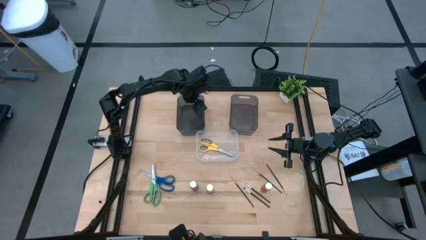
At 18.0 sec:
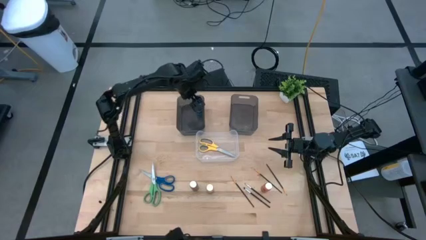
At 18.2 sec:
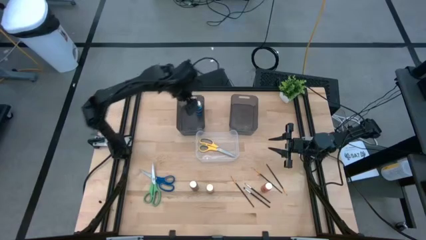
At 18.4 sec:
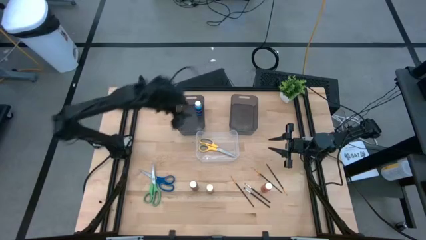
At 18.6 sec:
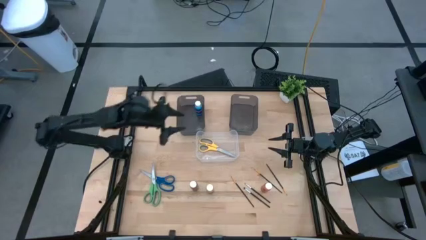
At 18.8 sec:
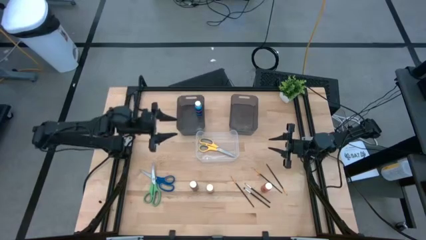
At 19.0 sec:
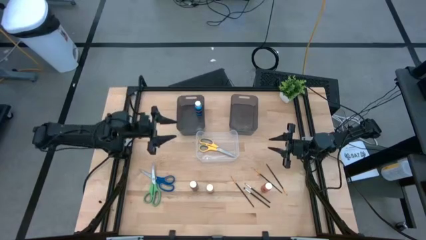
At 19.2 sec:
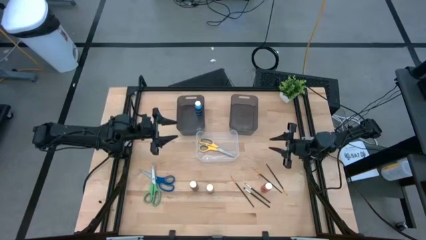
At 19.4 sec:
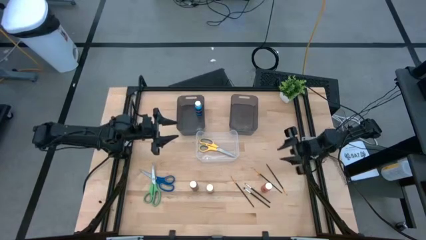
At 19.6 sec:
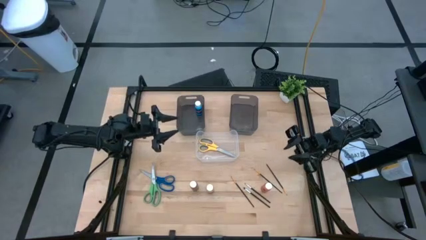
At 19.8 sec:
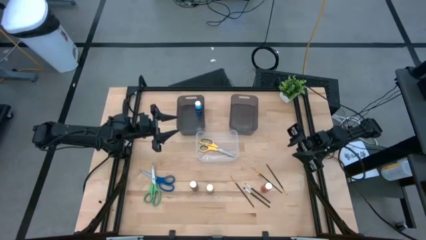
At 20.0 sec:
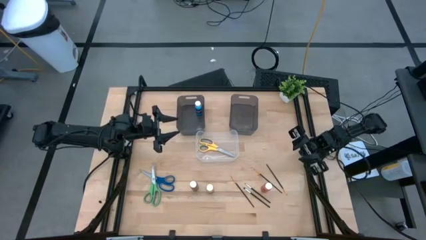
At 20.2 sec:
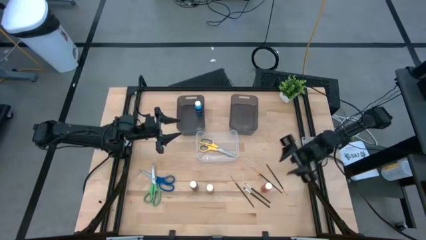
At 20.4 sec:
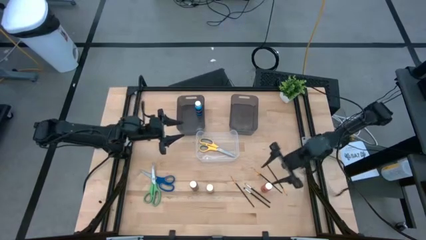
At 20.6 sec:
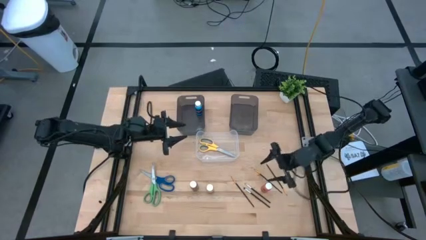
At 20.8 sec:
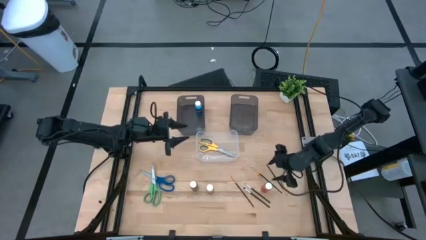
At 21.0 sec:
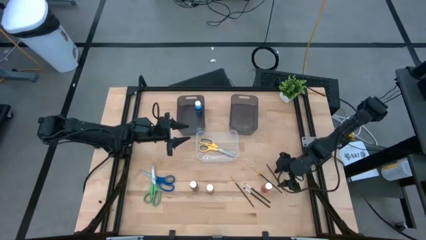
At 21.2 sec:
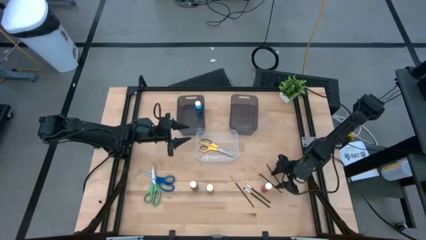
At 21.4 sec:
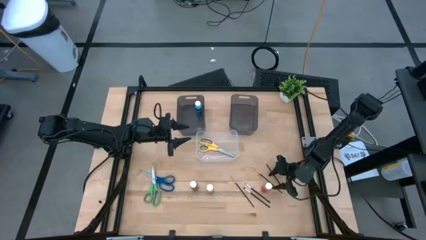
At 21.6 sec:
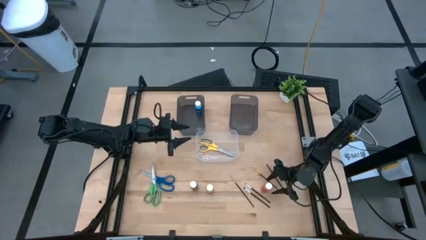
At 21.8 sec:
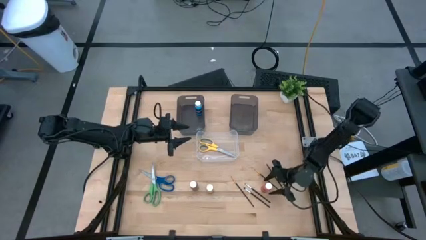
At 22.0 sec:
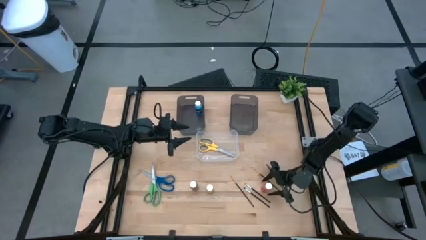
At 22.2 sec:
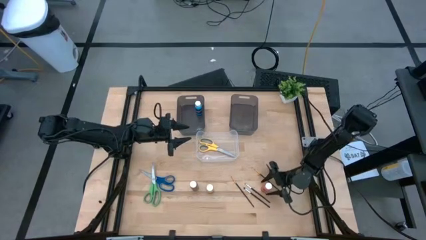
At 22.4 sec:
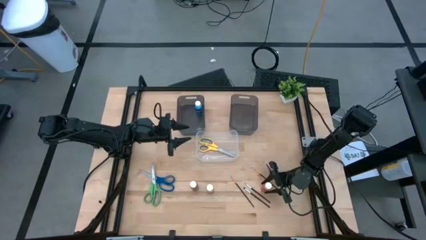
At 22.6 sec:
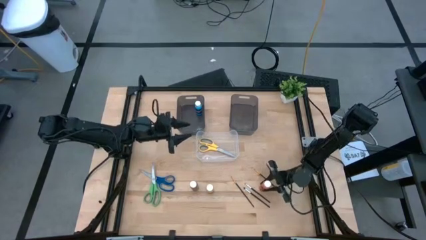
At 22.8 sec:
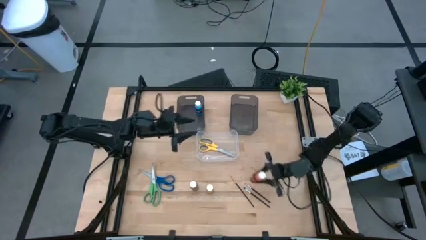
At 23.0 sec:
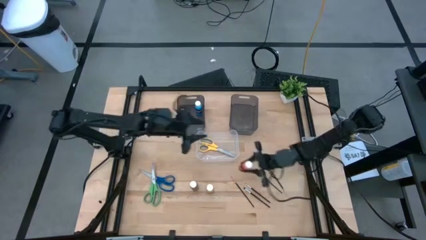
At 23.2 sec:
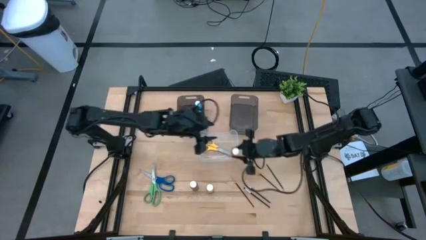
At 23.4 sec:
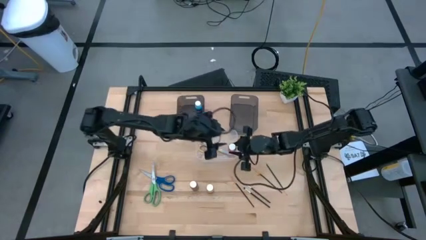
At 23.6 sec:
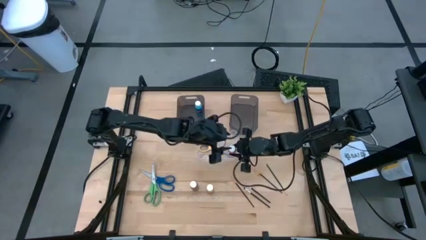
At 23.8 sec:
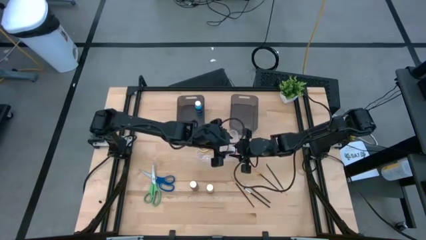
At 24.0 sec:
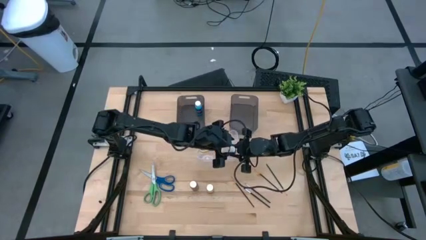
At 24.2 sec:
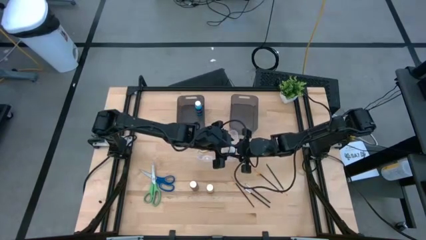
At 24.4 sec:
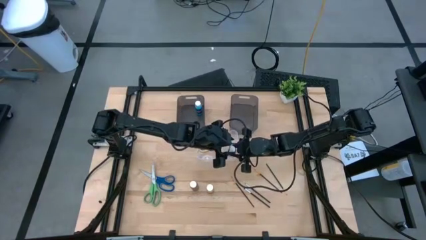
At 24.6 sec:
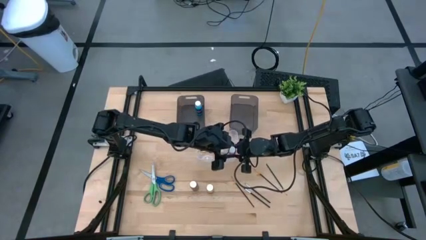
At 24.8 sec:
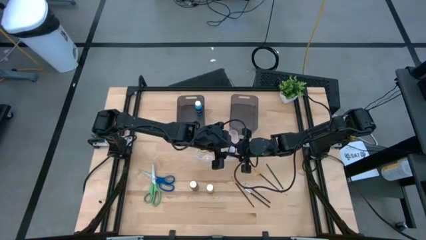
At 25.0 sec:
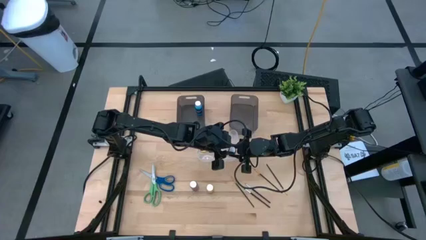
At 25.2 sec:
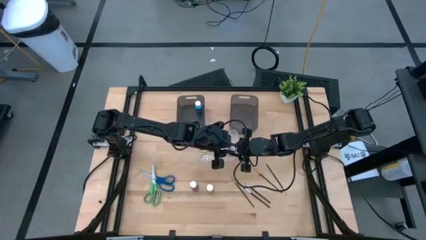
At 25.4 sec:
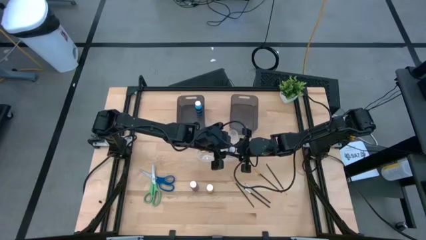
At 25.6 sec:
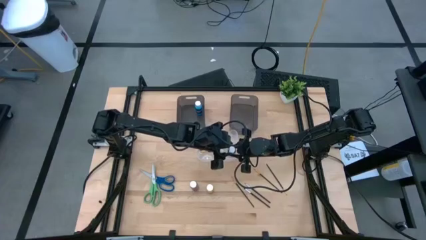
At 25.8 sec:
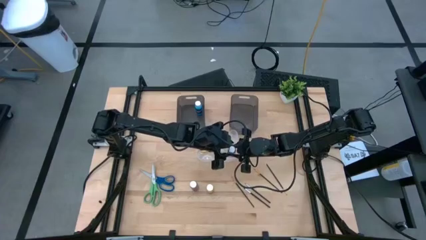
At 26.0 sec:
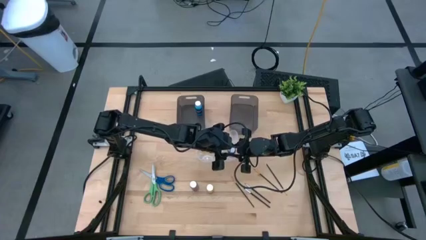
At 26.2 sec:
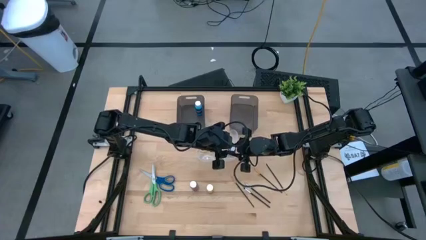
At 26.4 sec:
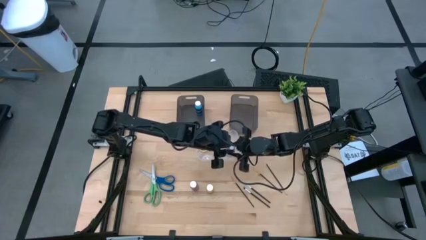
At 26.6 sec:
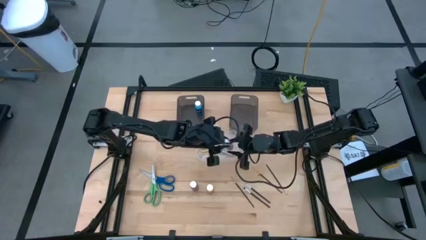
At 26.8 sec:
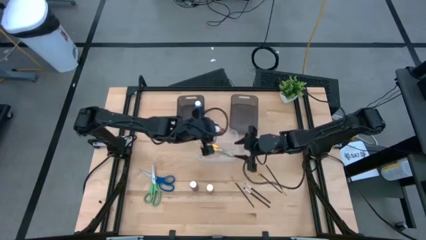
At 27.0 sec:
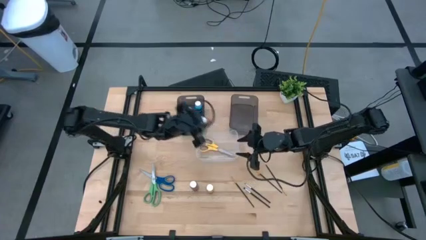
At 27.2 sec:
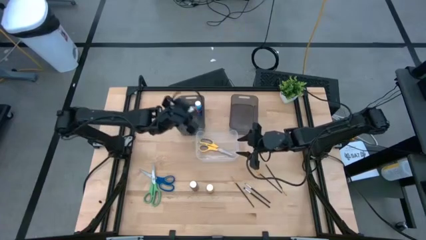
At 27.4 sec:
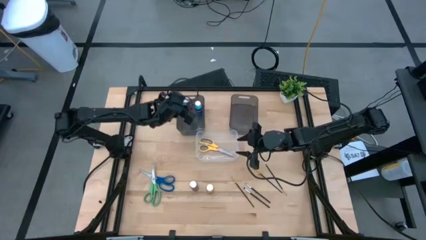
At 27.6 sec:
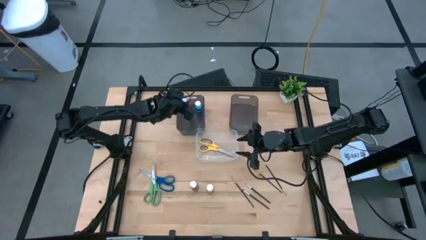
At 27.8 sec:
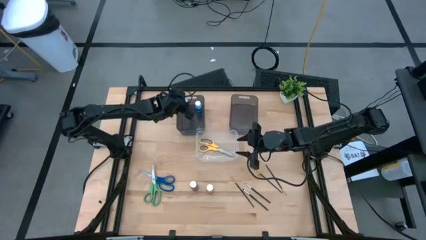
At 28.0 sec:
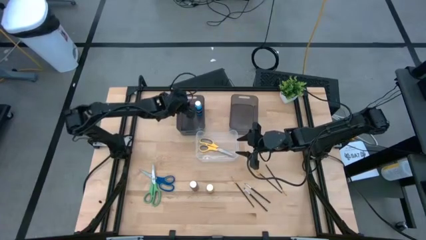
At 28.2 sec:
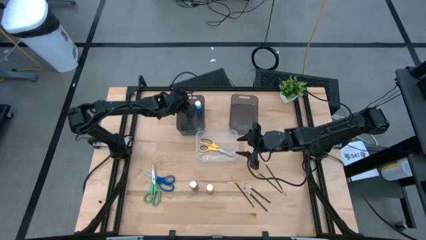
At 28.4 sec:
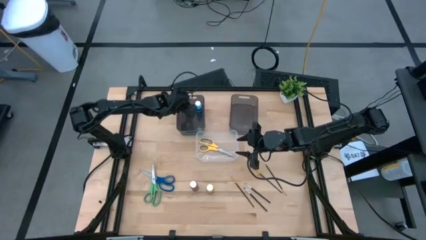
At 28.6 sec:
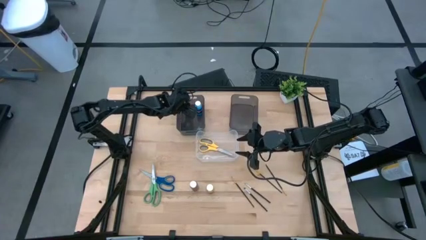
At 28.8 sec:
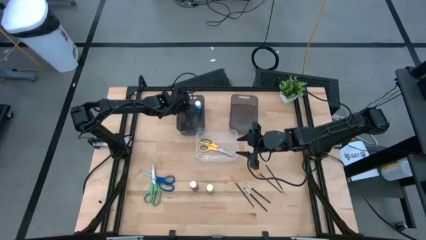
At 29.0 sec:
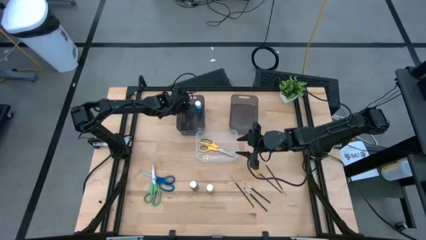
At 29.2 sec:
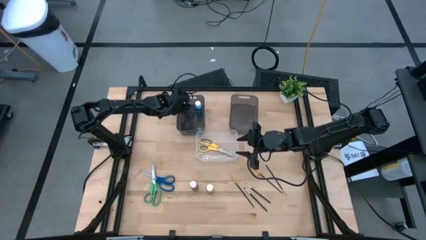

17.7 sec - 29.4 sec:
Task: Pick & Place Paint Supplies
Put the right orange paint bottle into the left black bin

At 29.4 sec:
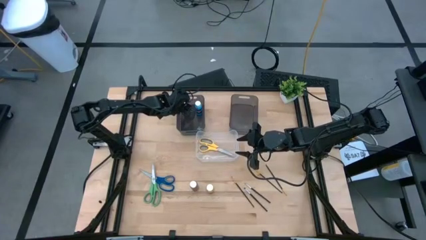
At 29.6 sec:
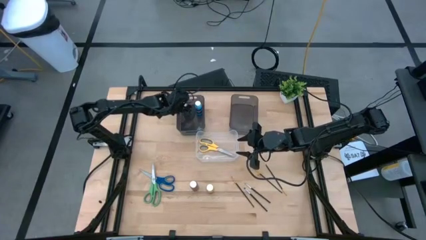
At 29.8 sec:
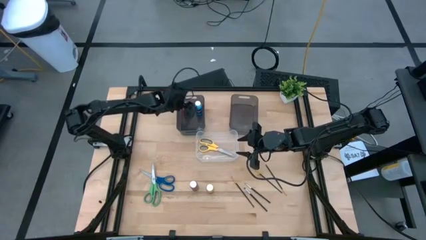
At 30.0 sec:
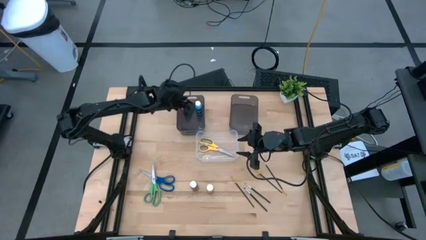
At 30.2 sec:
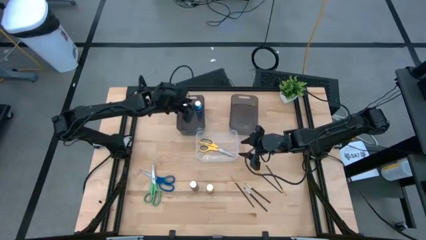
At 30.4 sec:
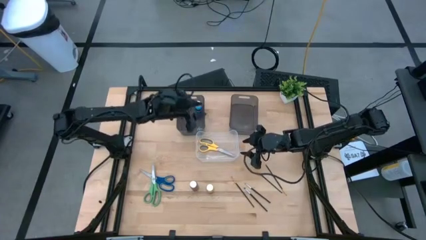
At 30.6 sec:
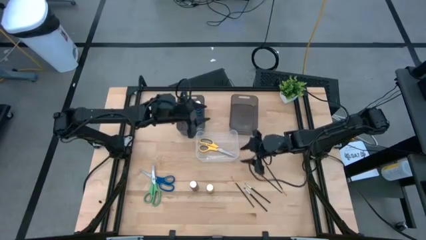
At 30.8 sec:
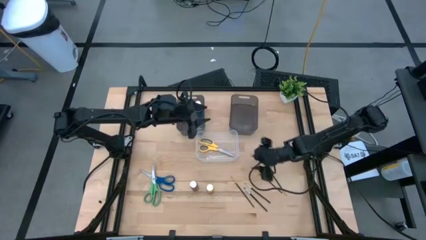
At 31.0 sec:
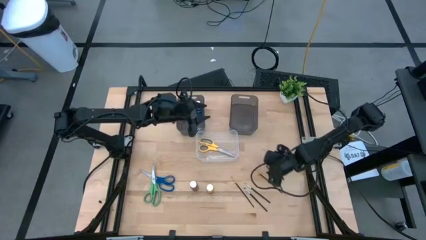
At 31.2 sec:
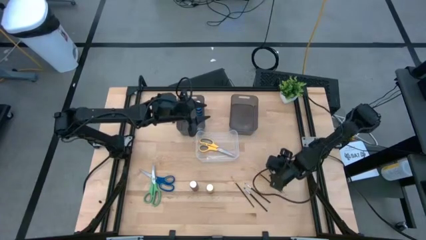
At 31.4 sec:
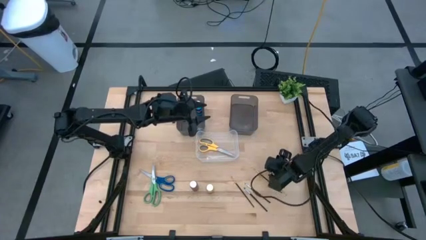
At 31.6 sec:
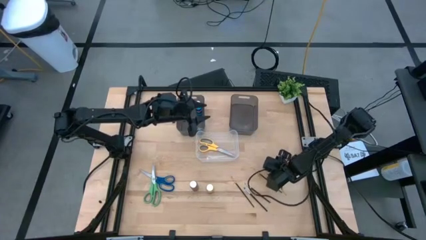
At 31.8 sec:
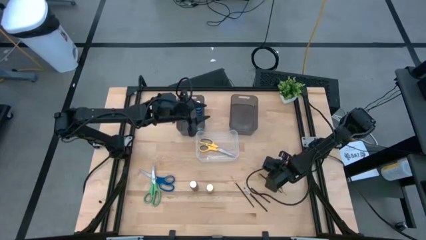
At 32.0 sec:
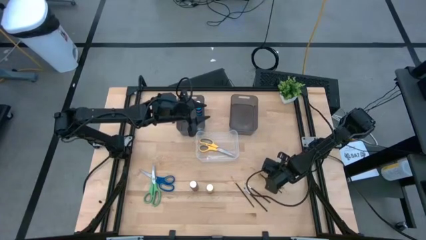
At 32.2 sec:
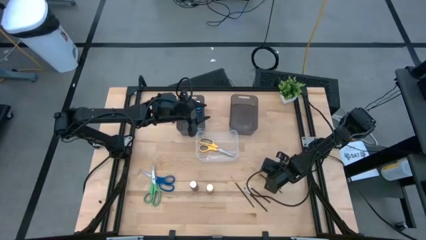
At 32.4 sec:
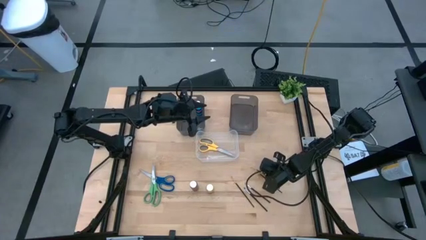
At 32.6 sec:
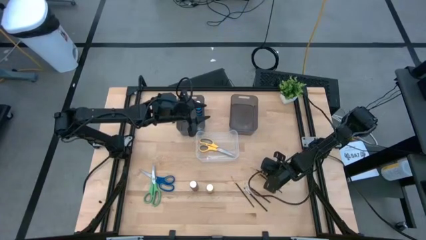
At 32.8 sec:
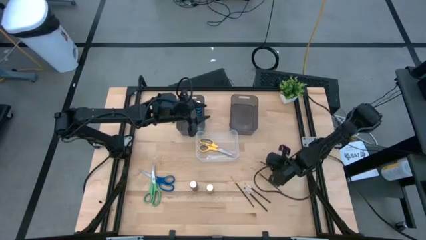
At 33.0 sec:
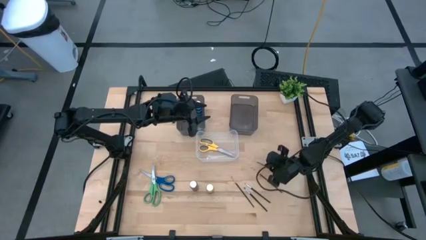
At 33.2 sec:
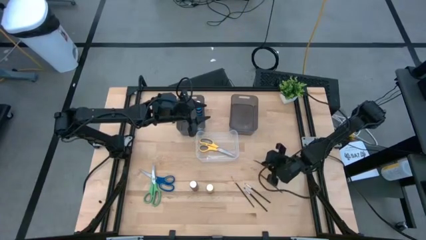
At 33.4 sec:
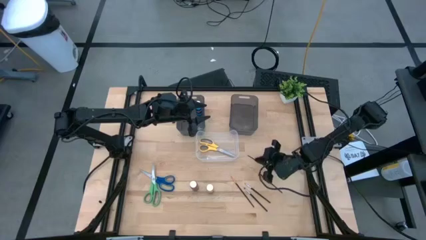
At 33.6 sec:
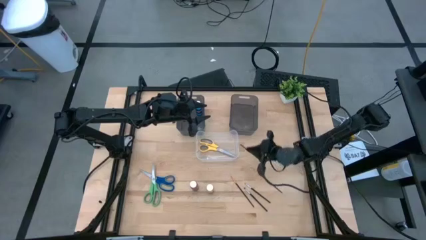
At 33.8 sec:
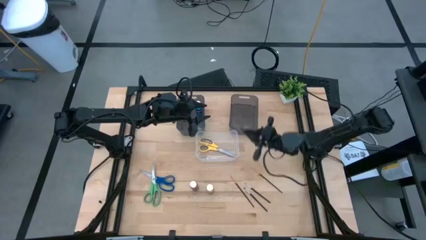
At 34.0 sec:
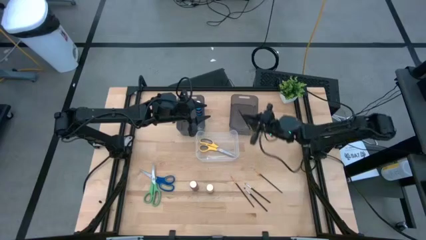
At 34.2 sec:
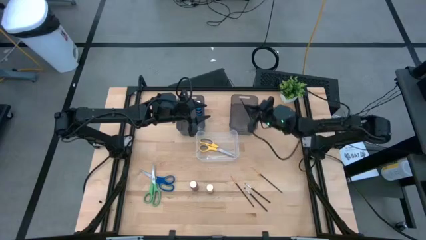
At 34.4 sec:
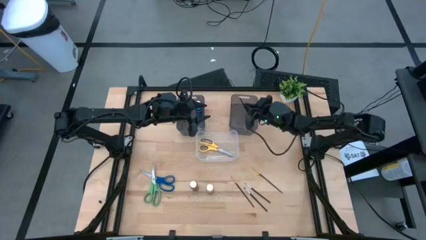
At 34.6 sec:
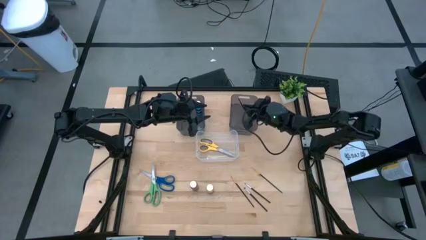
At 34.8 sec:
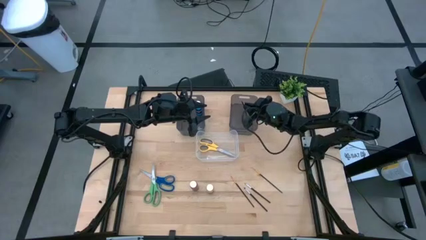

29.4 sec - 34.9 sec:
Put the right black and gold brush into the right black bin
